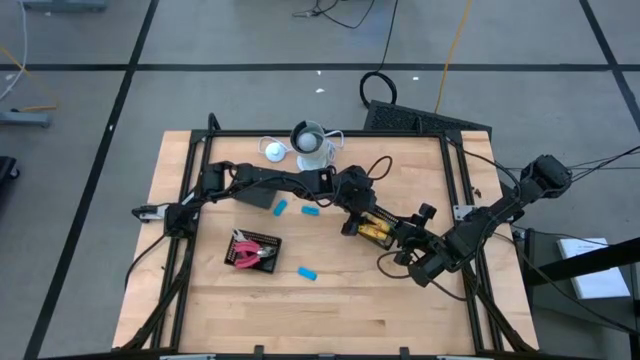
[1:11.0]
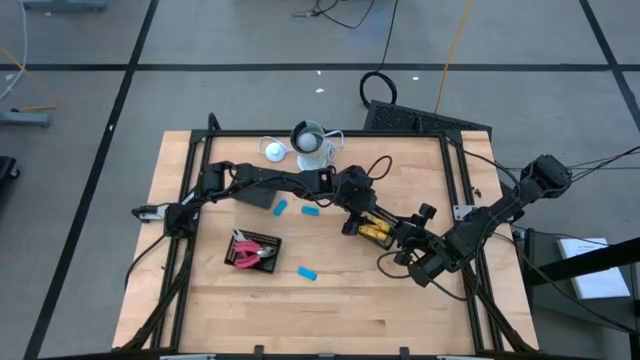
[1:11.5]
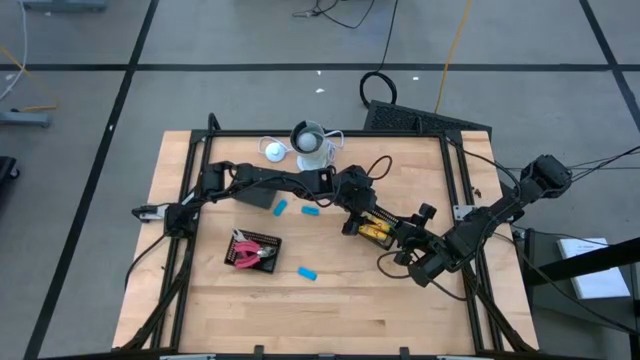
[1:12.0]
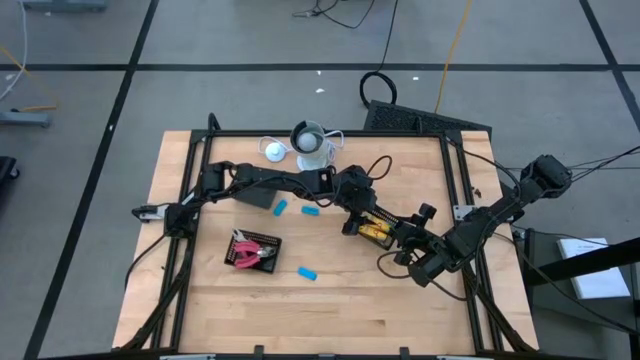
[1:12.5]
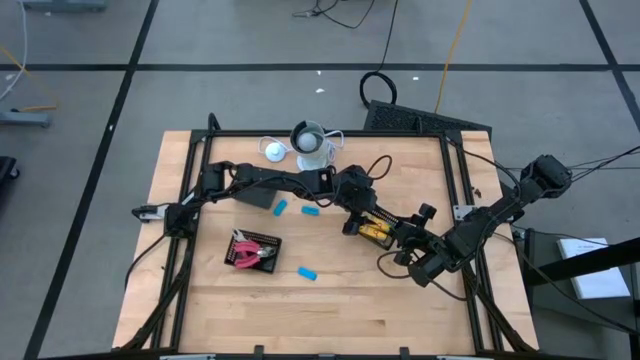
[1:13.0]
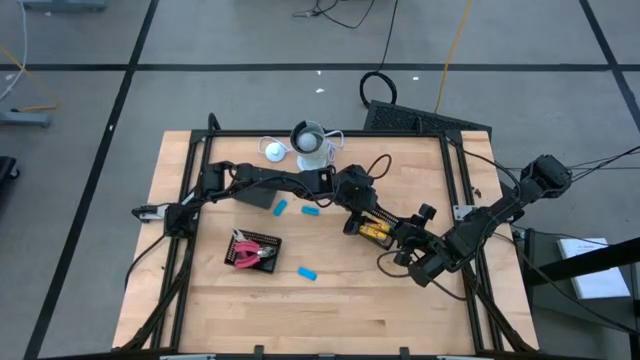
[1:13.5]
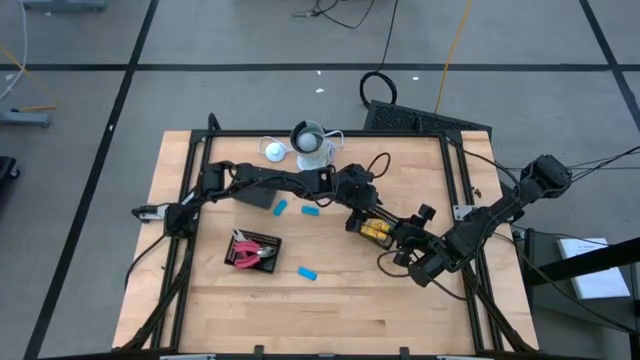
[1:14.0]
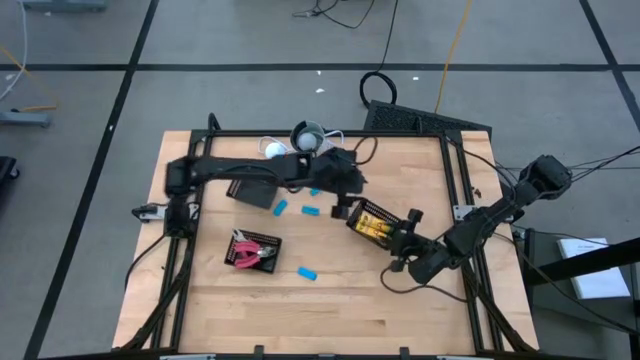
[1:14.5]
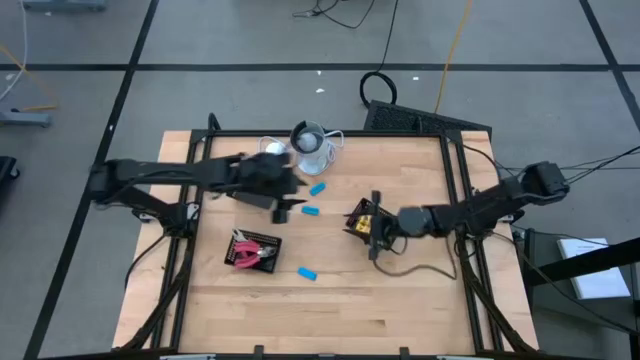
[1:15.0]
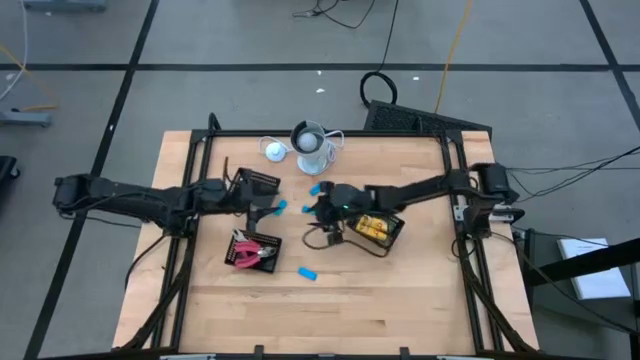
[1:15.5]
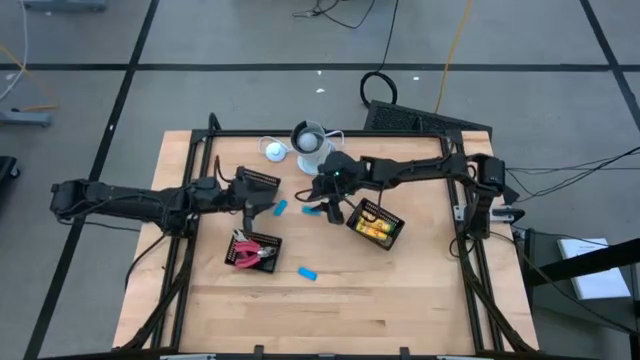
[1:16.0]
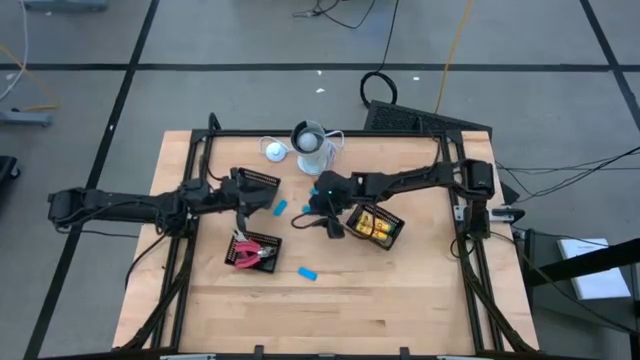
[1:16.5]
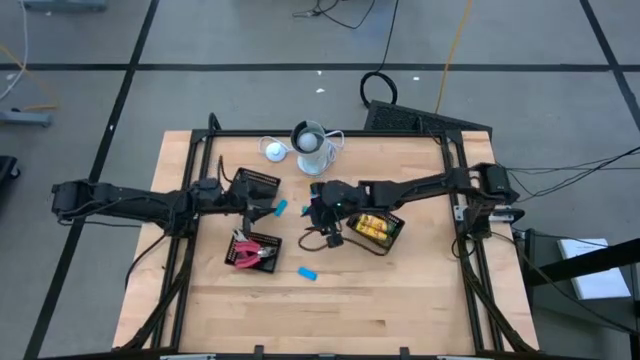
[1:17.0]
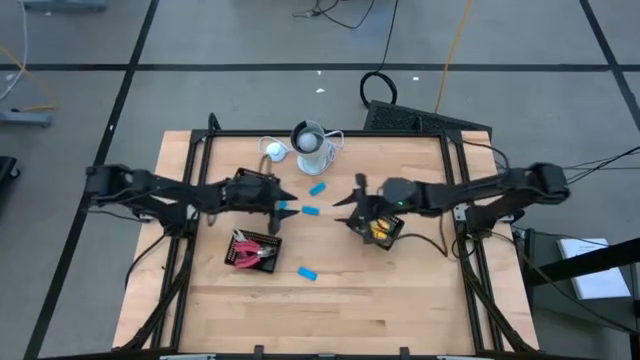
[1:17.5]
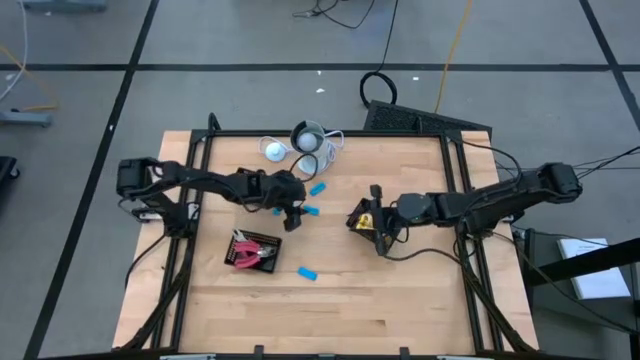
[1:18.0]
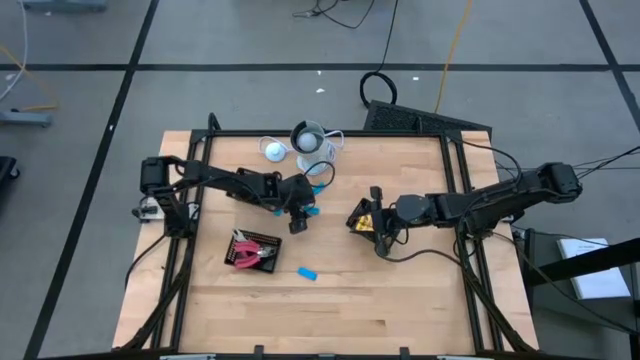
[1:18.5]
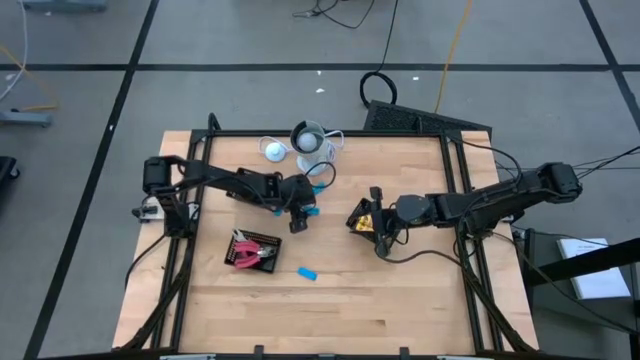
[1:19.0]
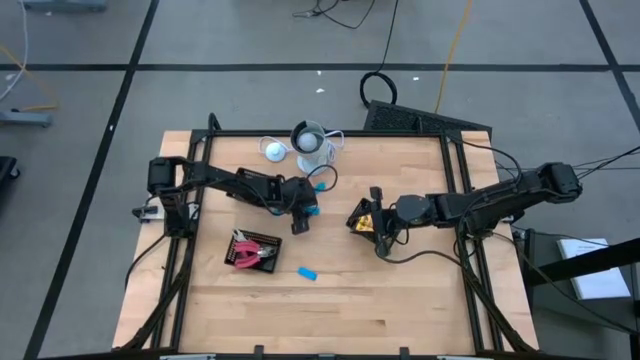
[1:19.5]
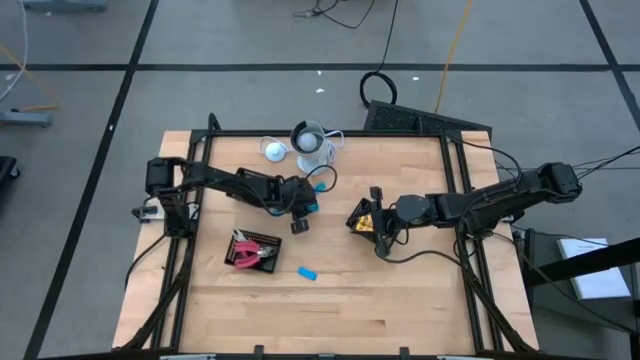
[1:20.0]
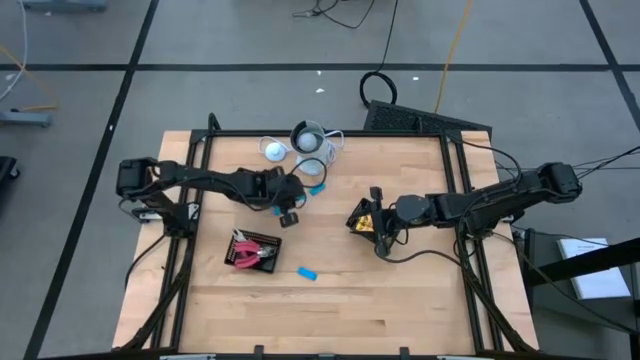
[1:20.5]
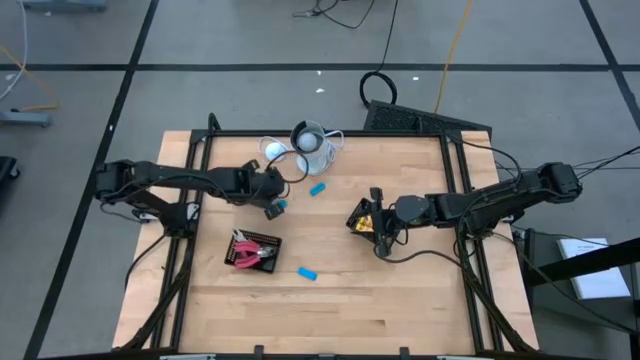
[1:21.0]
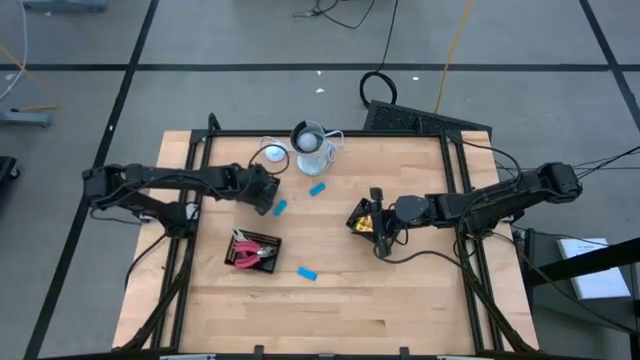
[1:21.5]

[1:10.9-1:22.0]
Task: Pick & Place School Supplies
Put the blue eraser into the top black bin

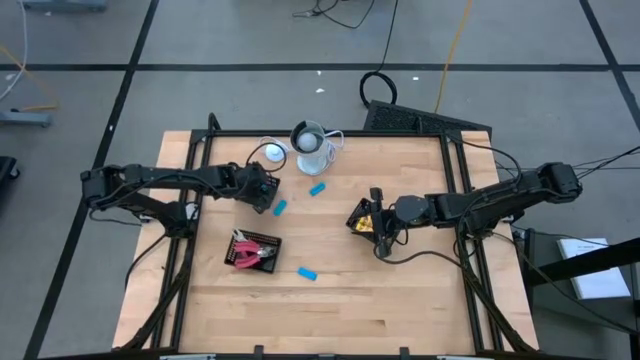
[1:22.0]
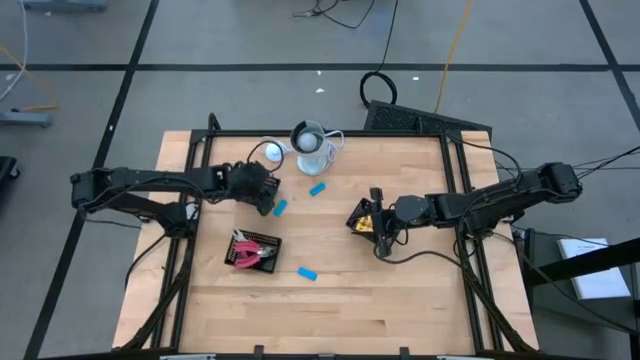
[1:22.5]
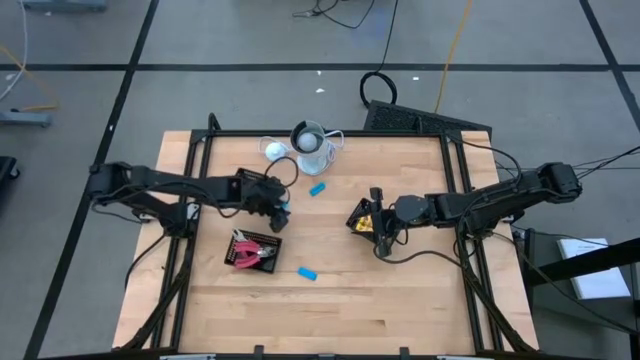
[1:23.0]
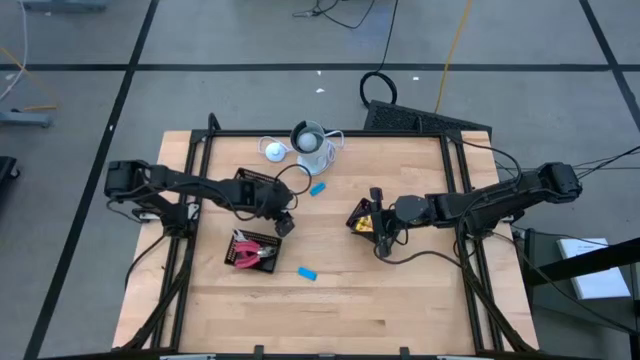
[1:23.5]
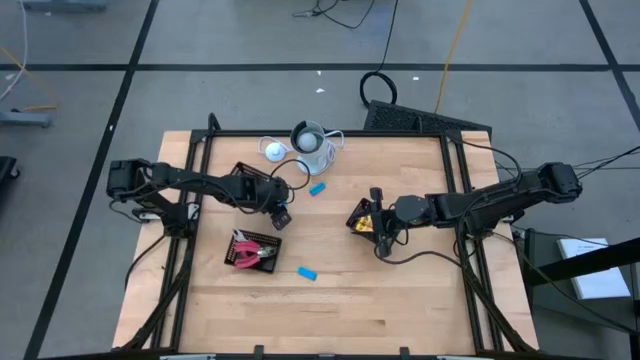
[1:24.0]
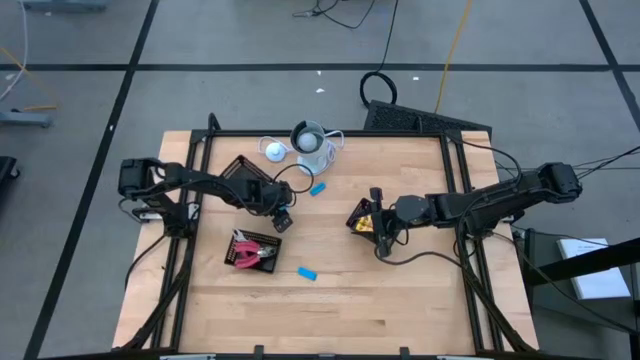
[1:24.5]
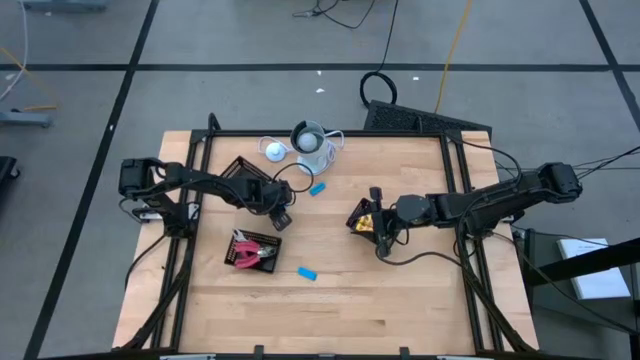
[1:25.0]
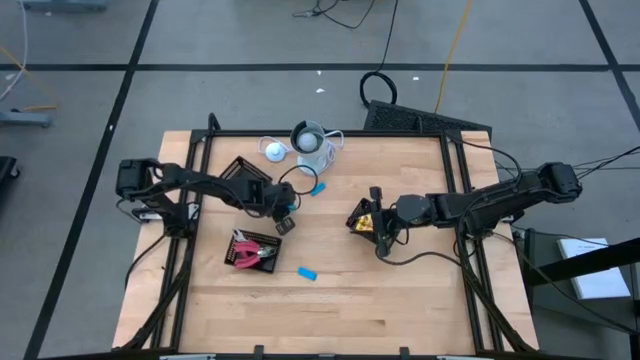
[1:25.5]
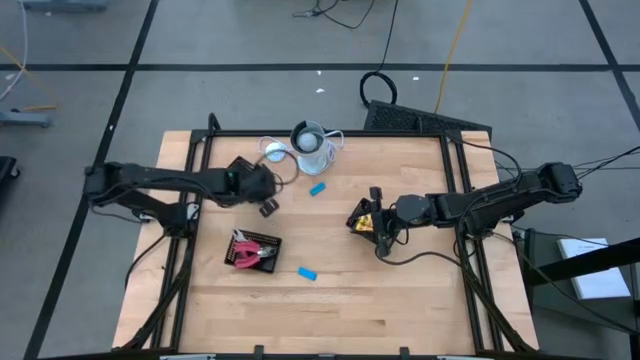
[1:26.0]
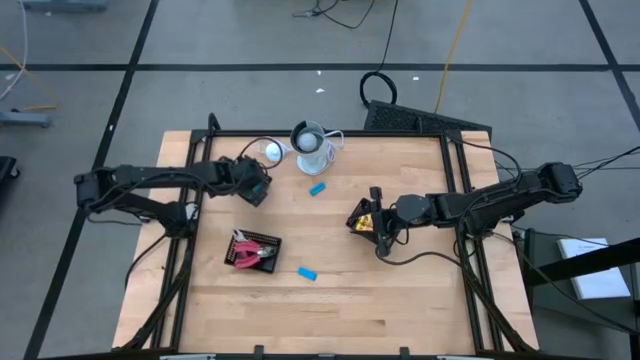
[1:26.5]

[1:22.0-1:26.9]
Put the blue eraser into the top black bin

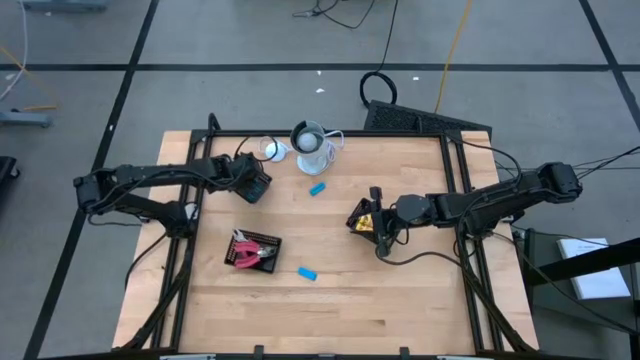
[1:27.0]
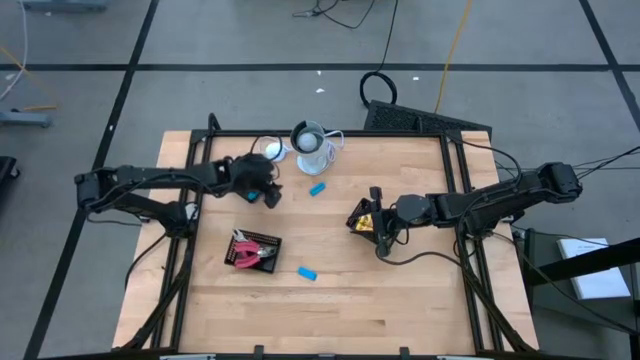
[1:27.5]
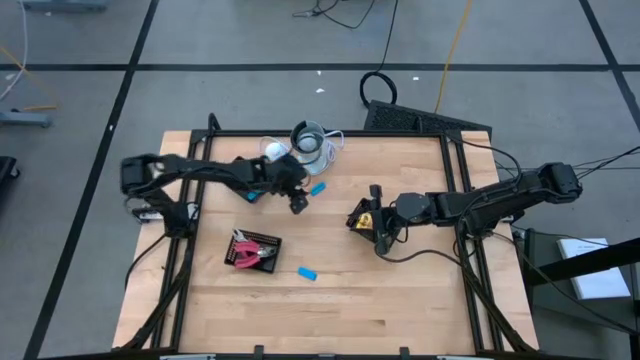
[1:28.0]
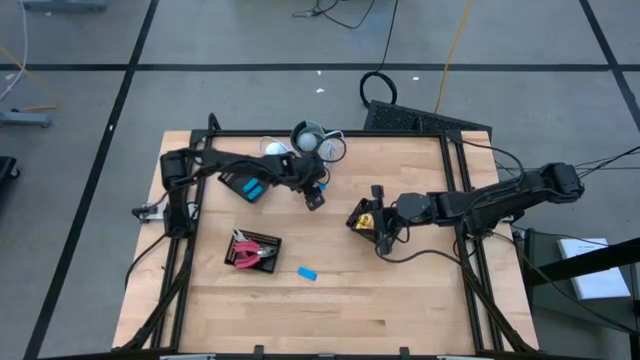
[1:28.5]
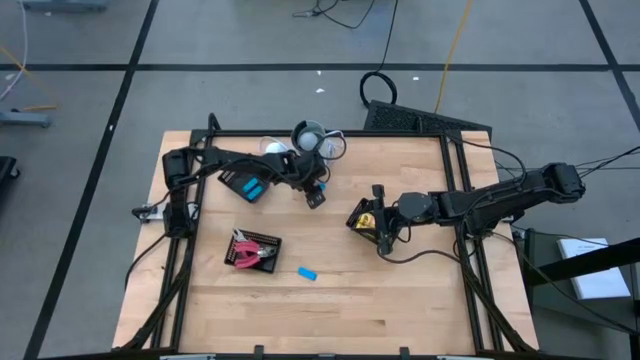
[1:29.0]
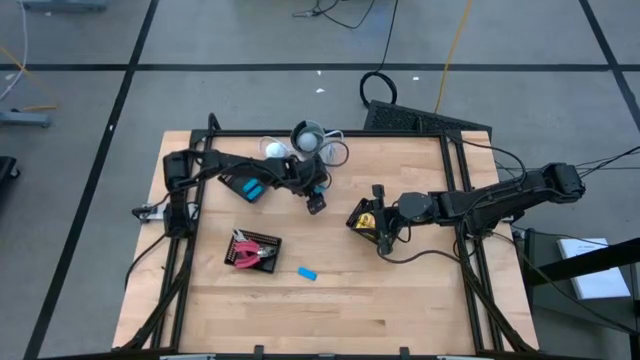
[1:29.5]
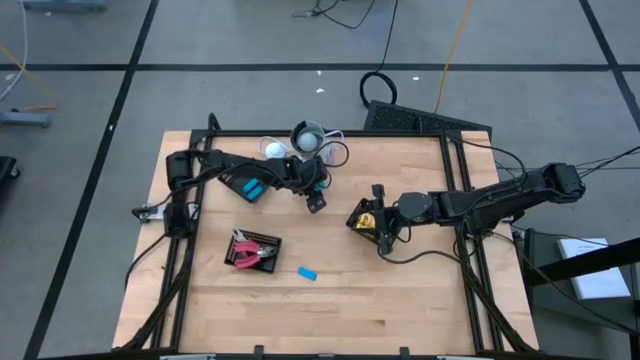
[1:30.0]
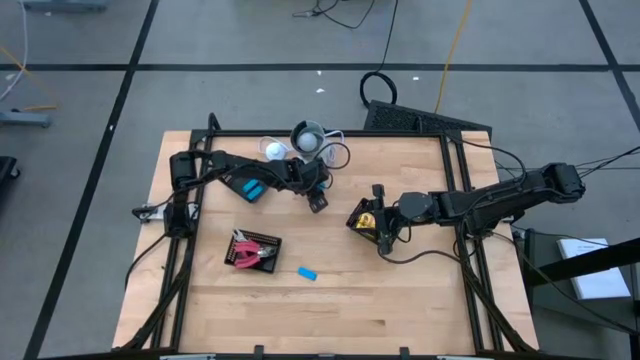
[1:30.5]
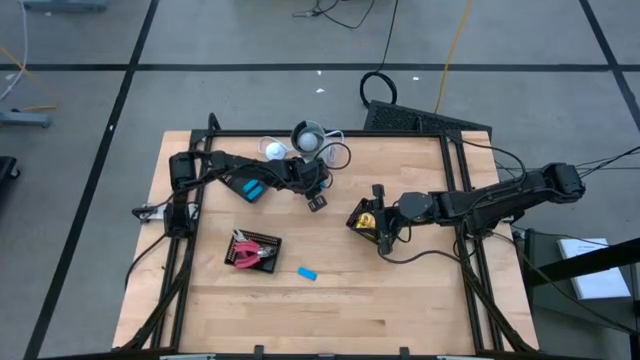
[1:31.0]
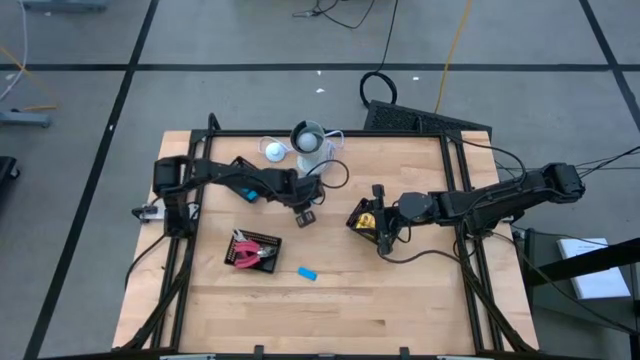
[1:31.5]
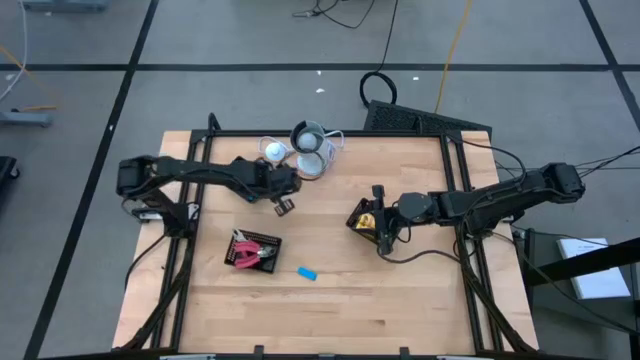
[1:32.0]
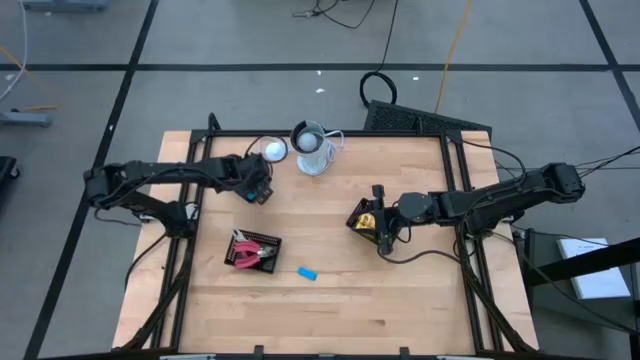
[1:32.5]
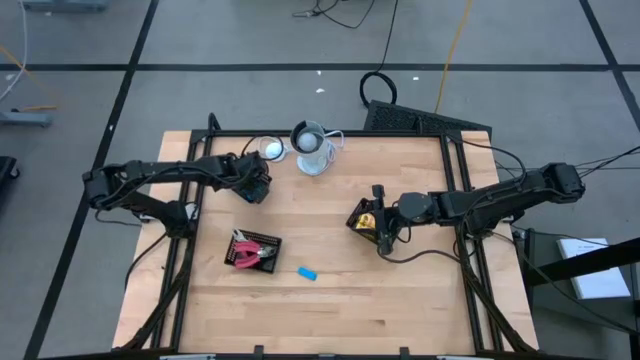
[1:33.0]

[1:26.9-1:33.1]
Put the blue eraser into the top black bin
